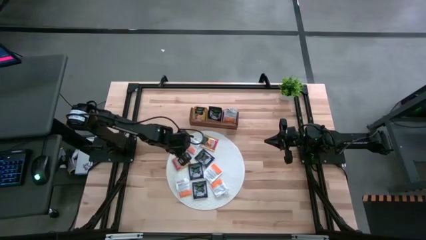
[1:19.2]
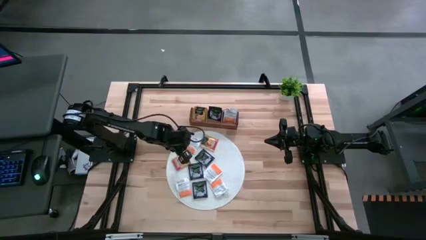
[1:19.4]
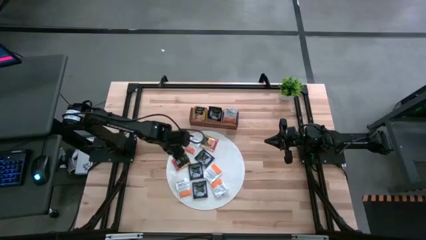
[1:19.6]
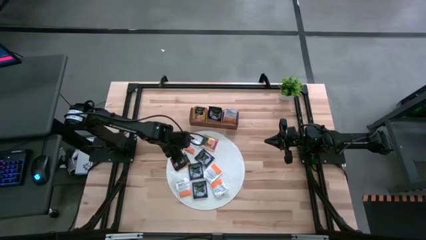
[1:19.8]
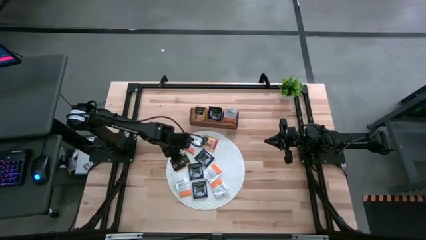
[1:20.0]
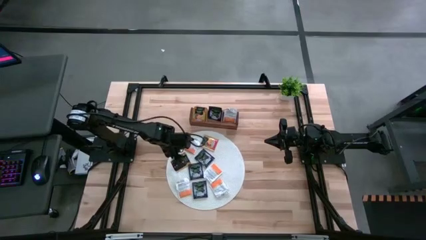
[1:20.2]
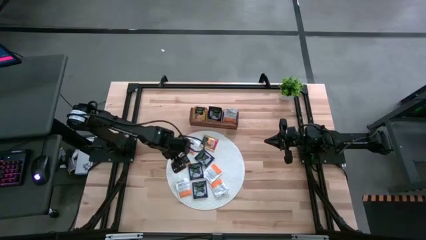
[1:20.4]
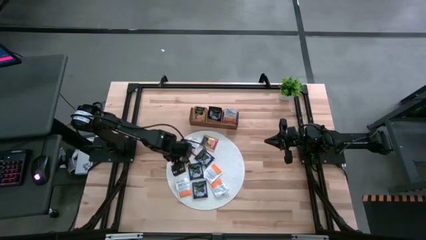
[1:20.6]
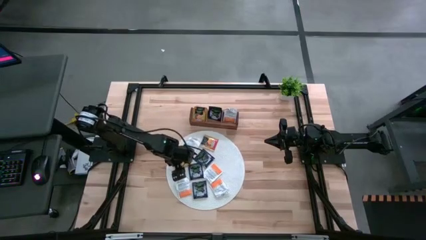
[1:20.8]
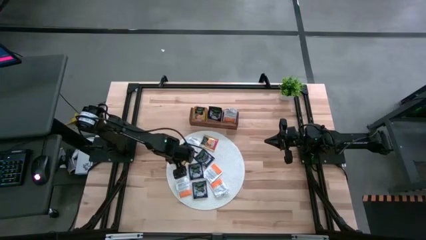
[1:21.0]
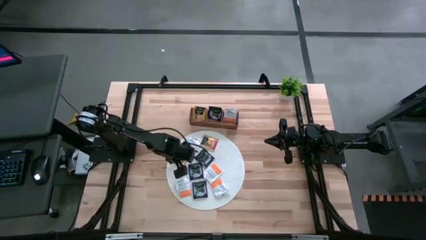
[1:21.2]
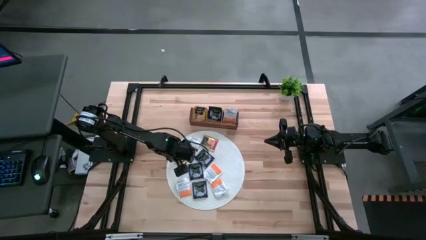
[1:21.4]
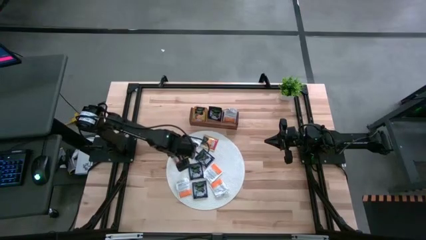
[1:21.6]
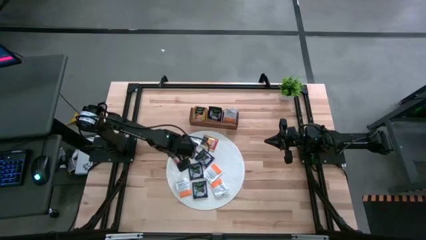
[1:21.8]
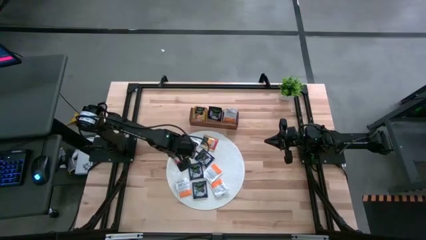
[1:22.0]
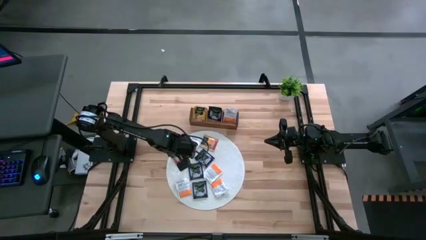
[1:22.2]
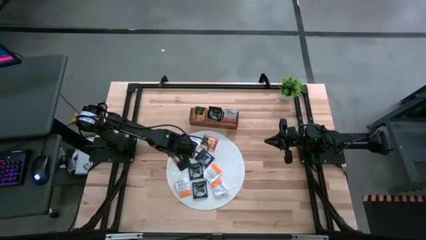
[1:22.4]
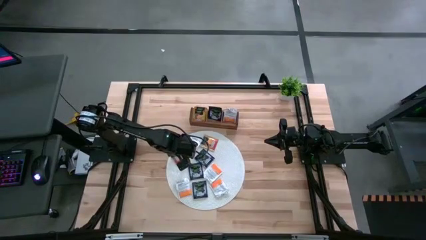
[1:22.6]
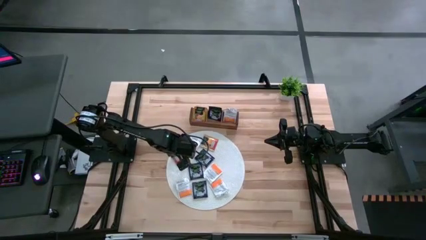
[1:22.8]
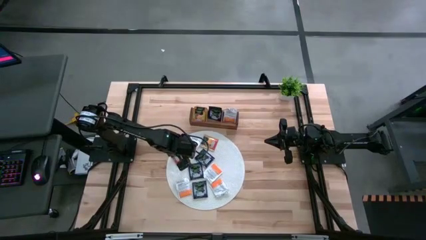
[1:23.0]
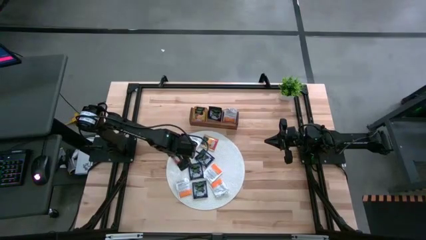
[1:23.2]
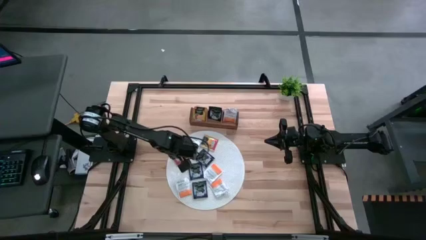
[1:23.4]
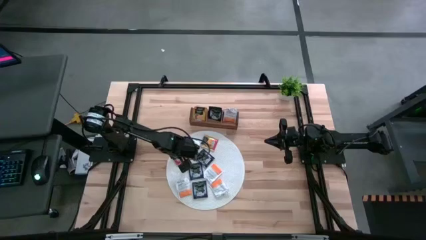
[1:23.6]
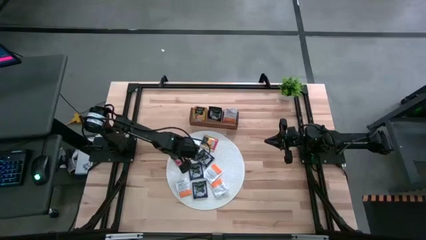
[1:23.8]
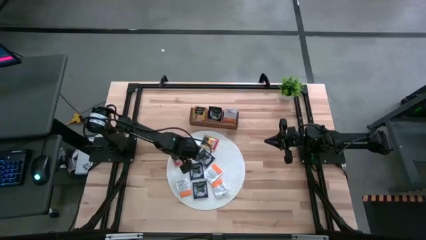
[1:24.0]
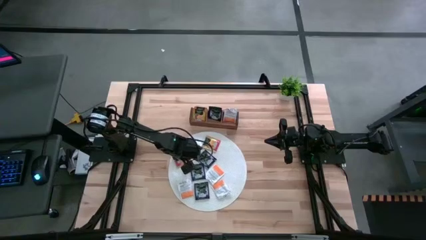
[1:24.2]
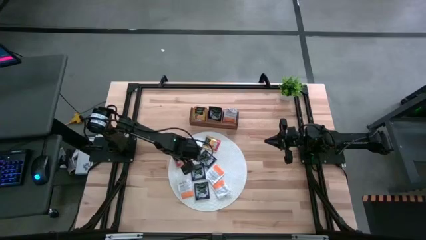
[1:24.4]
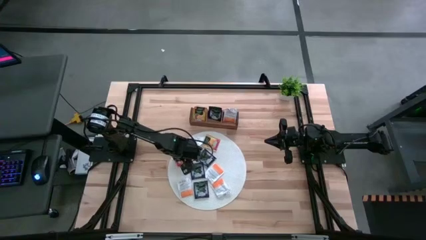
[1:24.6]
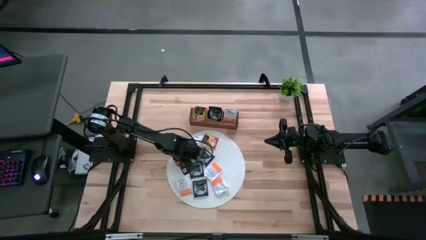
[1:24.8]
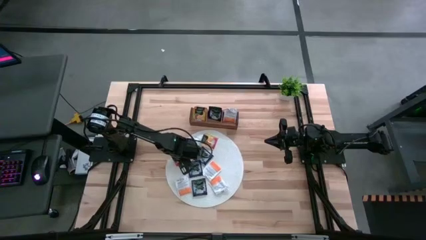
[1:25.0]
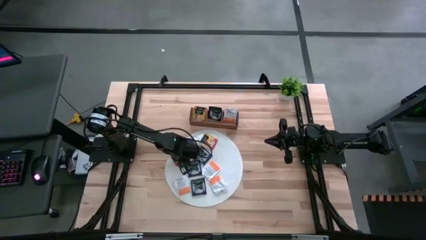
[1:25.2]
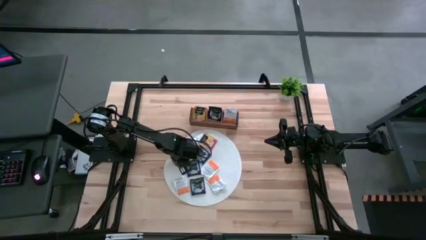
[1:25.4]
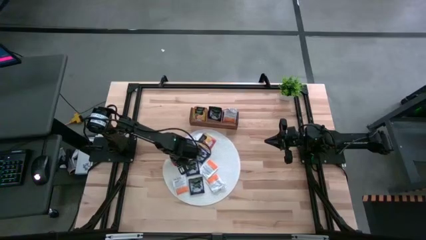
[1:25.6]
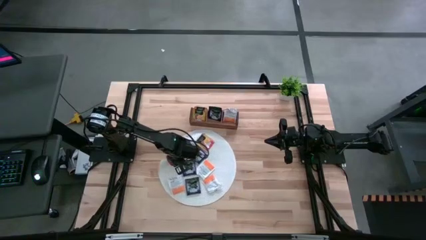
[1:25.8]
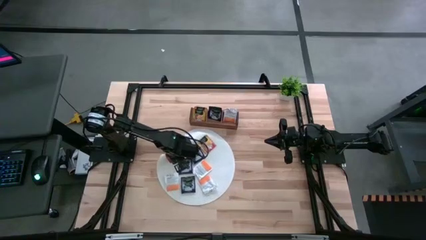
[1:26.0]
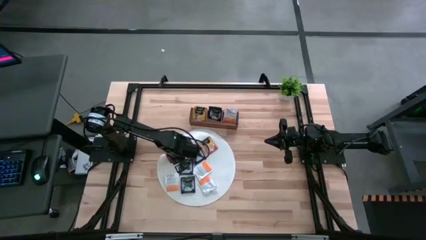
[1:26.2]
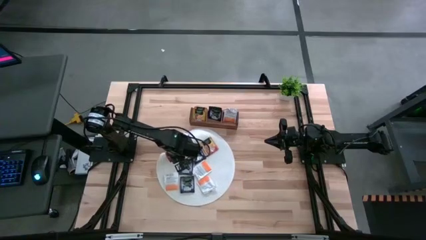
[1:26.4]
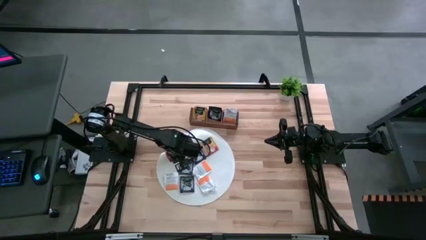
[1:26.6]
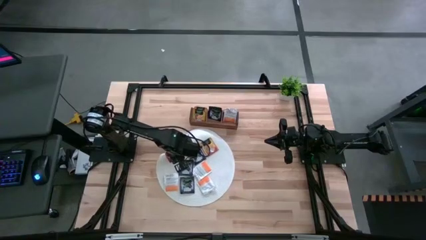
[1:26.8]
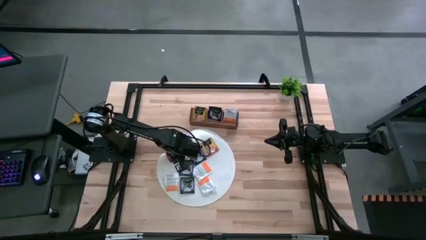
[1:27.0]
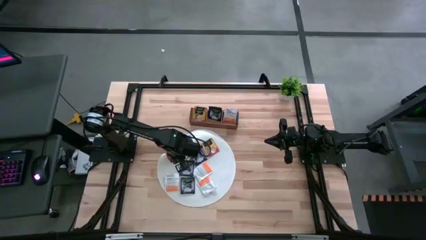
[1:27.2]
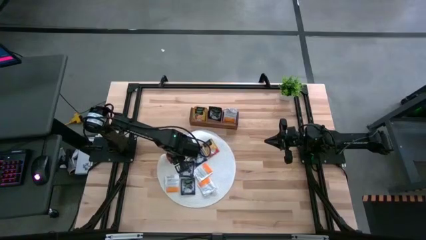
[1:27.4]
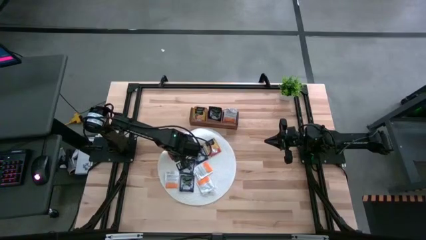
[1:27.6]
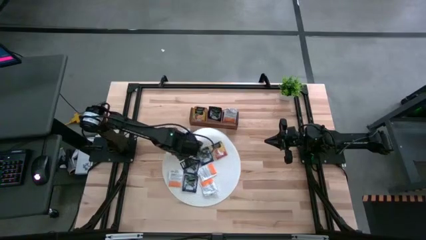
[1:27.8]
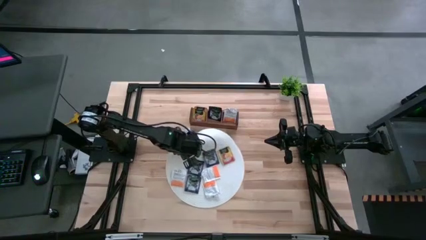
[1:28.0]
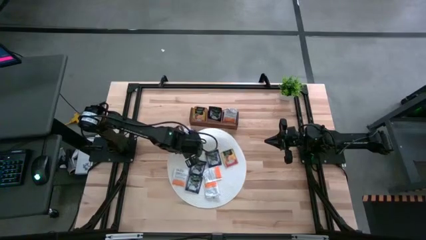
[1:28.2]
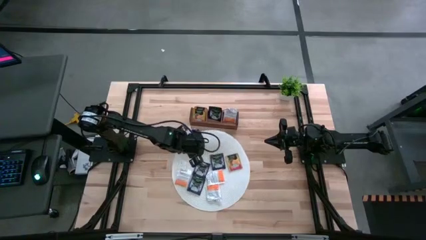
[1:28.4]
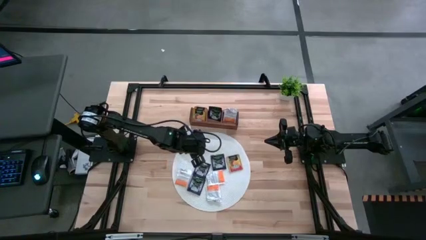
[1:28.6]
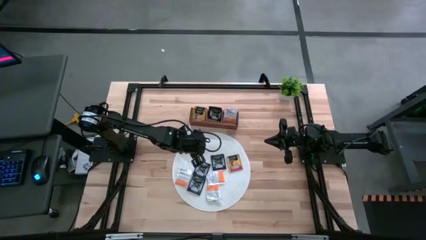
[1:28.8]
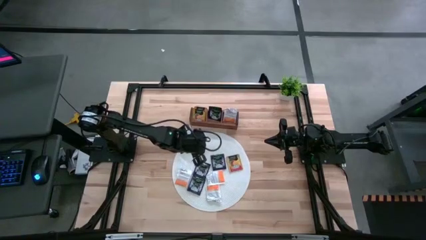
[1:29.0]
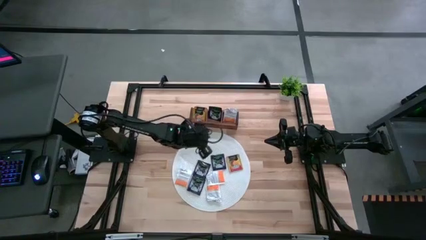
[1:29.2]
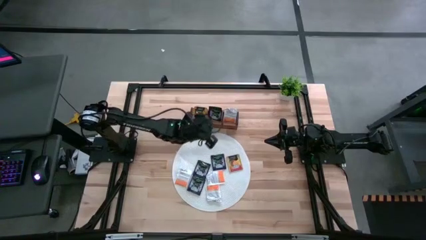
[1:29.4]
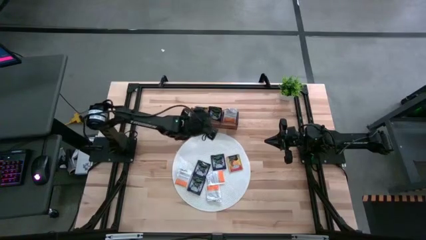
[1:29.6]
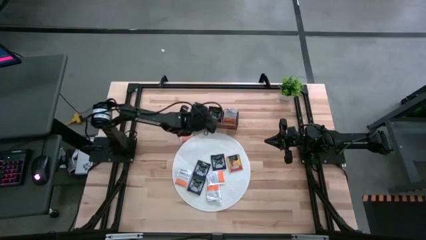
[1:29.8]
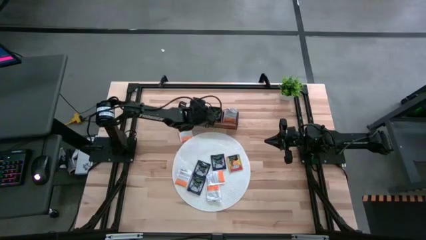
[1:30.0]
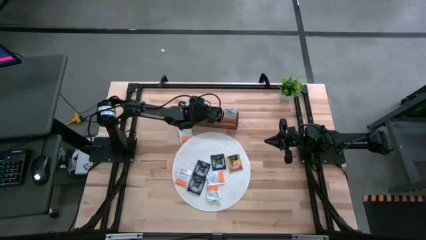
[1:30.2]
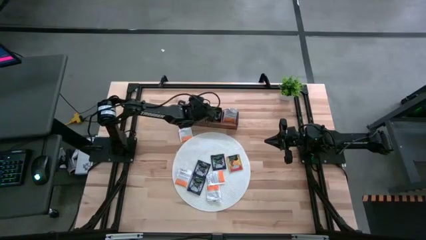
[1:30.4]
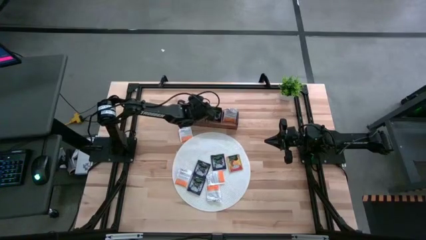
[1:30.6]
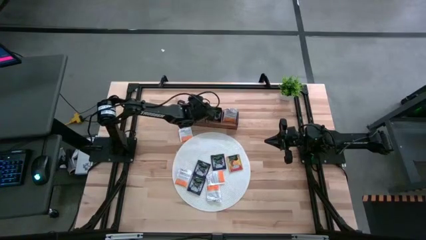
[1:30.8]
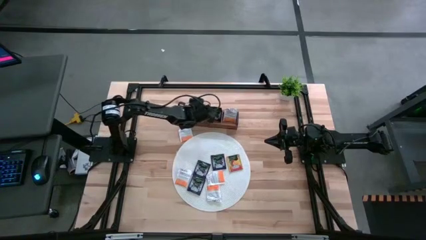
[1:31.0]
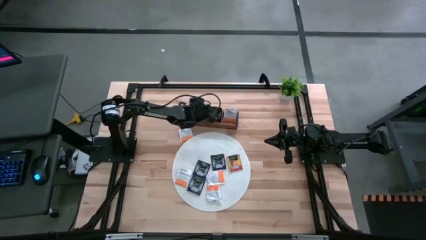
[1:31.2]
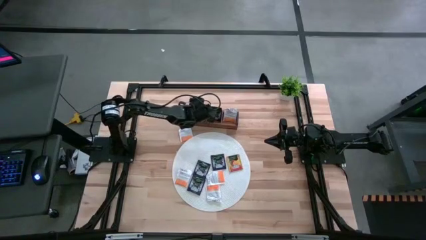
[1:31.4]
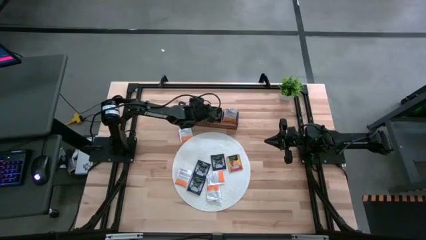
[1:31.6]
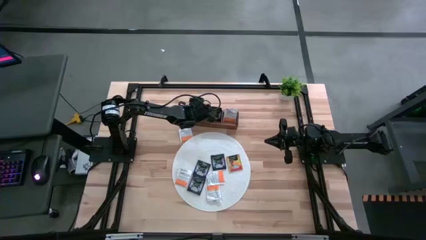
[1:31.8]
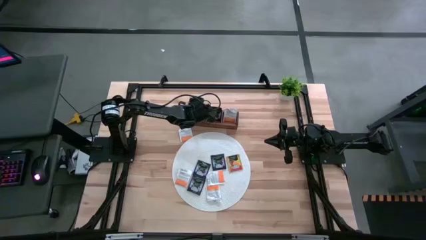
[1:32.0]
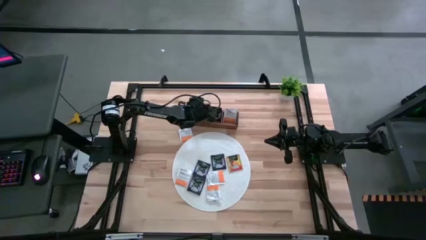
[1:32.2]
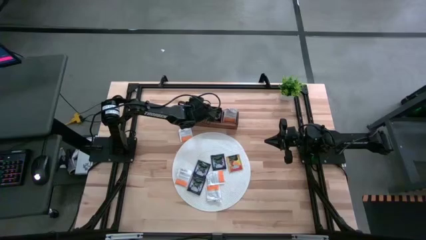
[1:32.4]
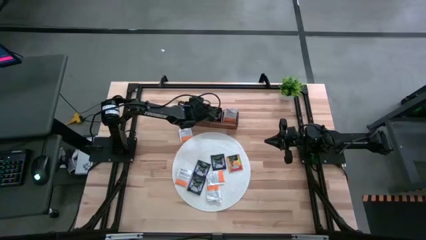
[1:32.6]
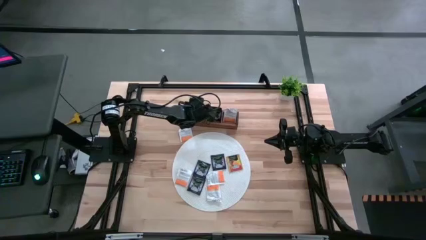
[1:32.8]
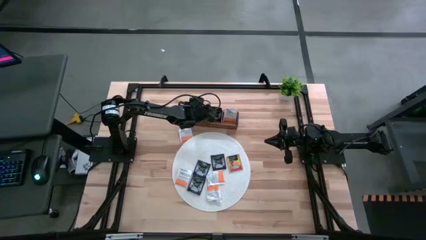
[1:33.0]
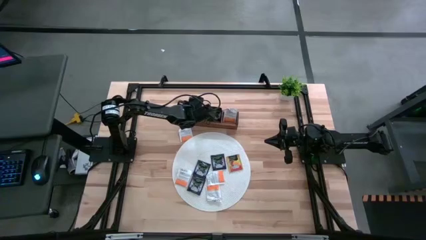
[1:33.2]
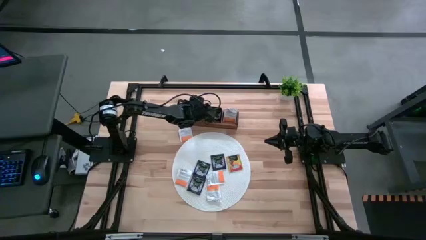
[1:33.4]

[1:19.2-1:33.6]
Task: Pick & Place Tea
Put the yellow tea bag into the left section of the wooden organizer
